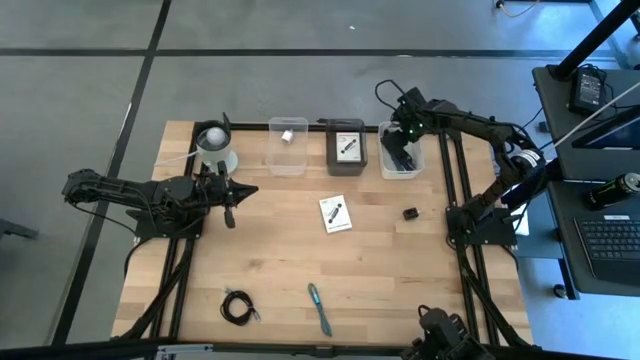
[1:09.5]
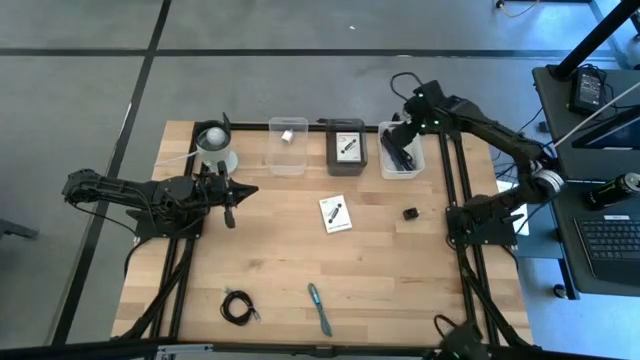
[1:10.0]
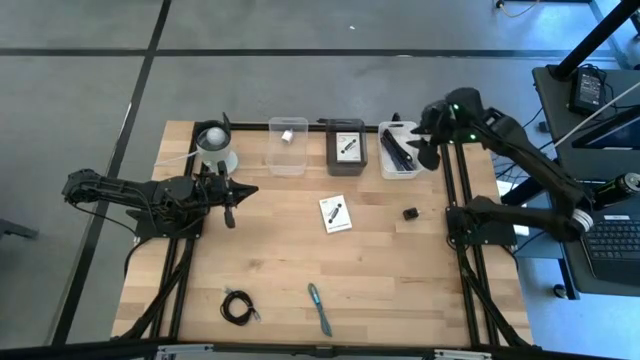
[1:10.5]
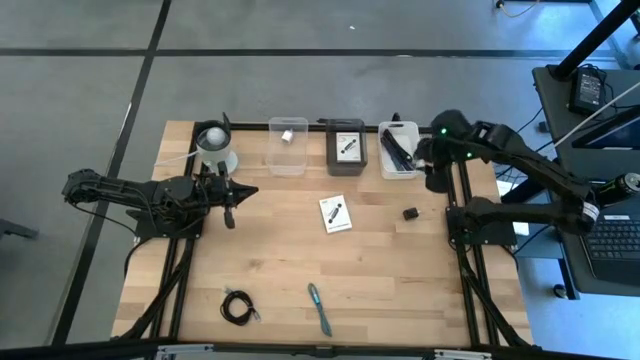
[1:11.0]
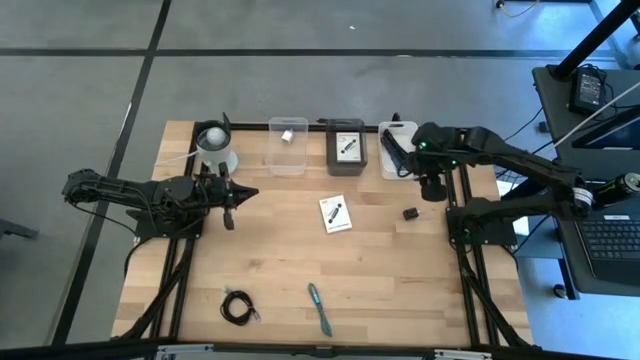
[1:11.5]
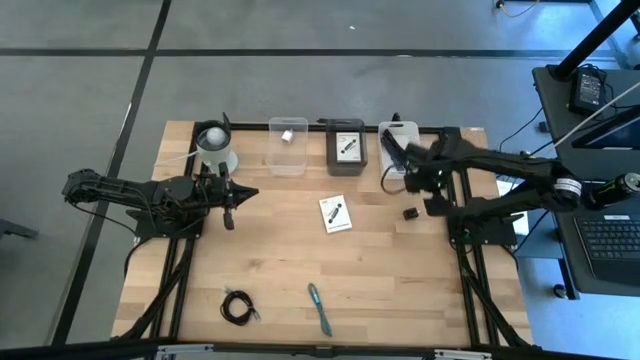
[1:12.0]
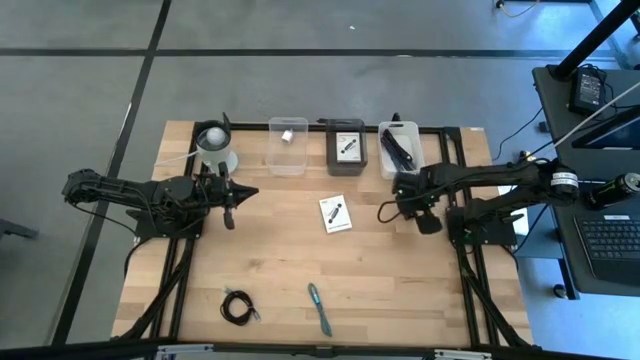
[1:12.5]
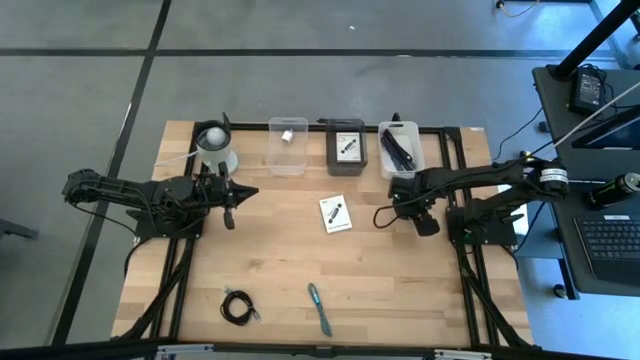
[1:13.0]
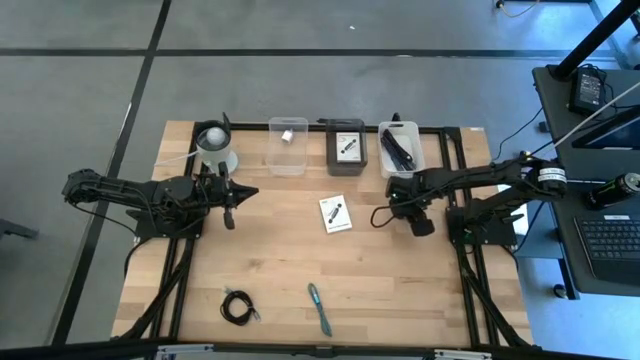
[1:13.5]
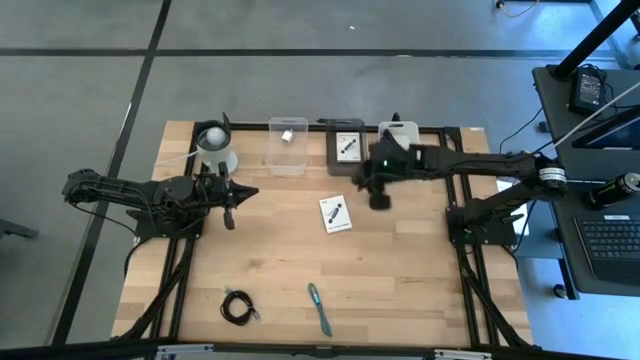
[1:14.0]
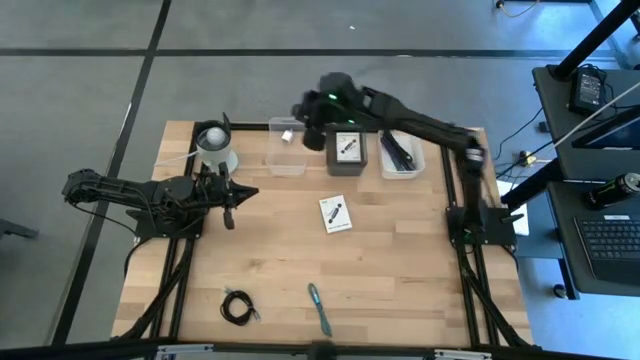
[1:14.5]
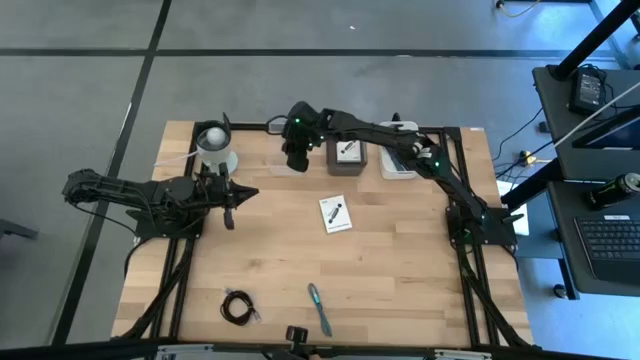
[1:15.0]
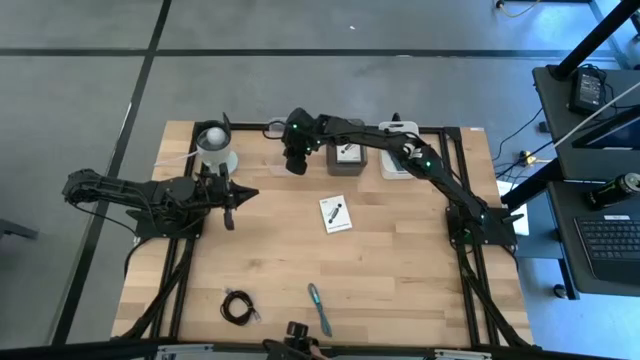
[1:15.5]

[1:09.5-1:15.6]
Task: Pick and place items into bin
Put the black charger adapter into the transparent bin

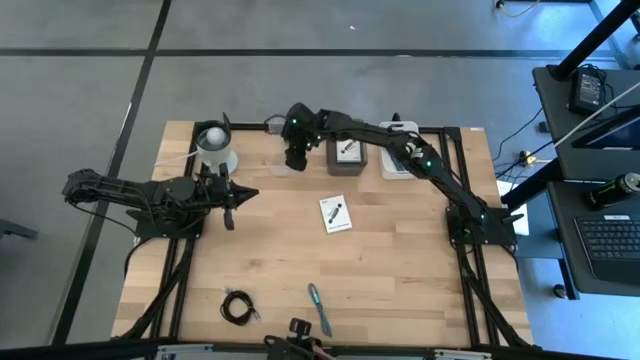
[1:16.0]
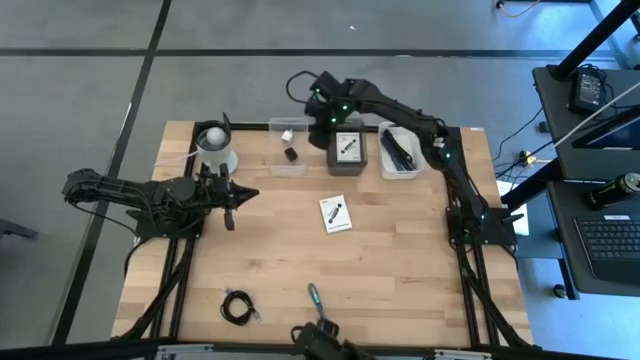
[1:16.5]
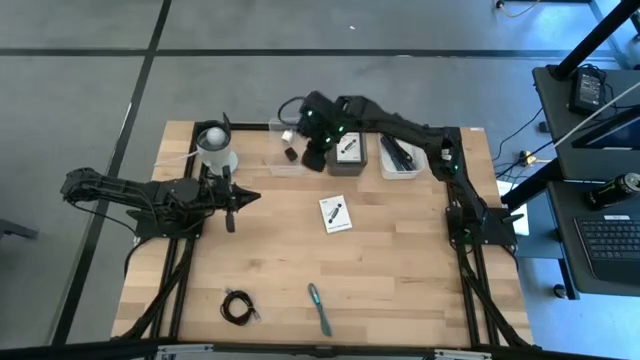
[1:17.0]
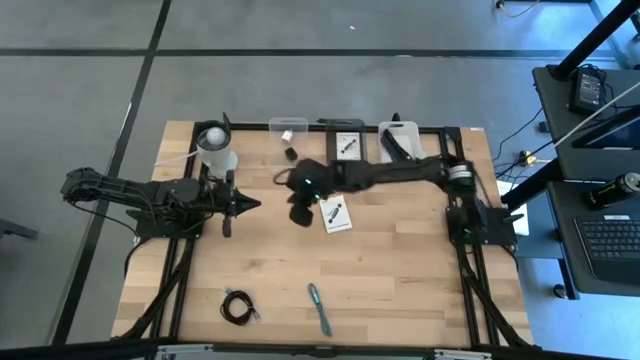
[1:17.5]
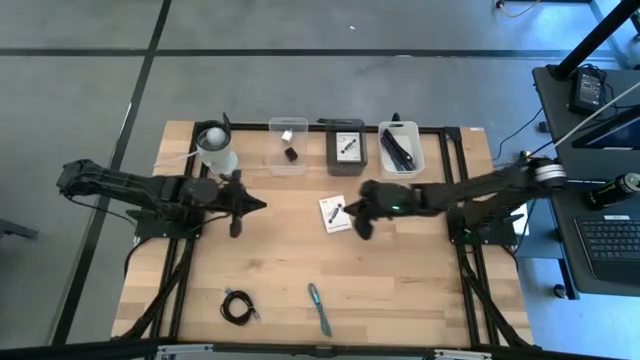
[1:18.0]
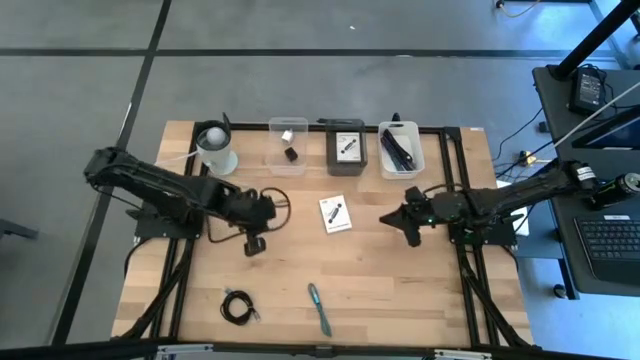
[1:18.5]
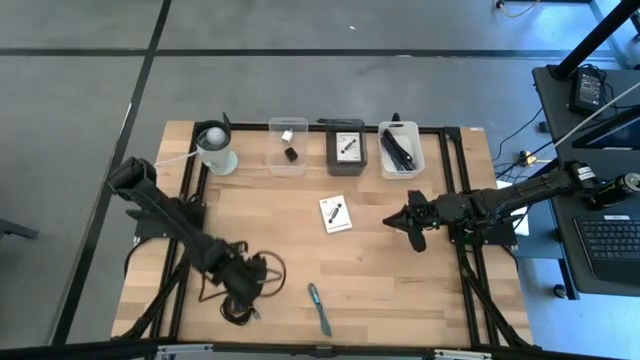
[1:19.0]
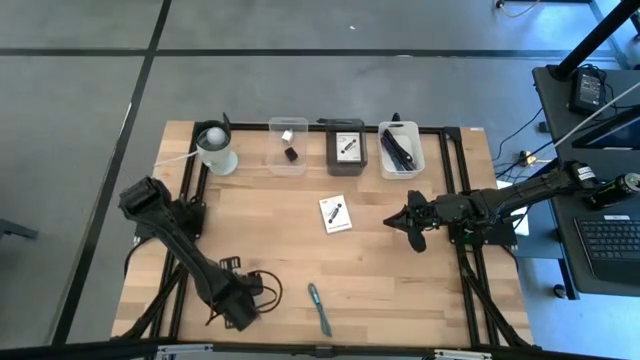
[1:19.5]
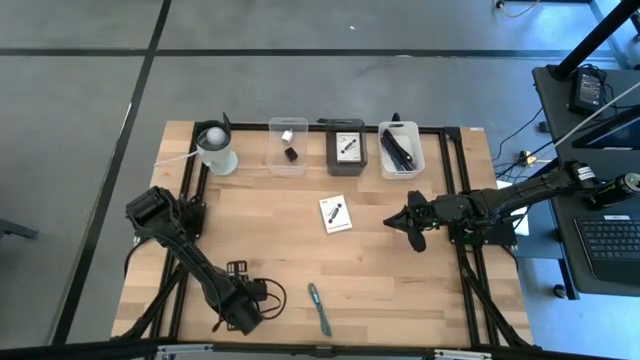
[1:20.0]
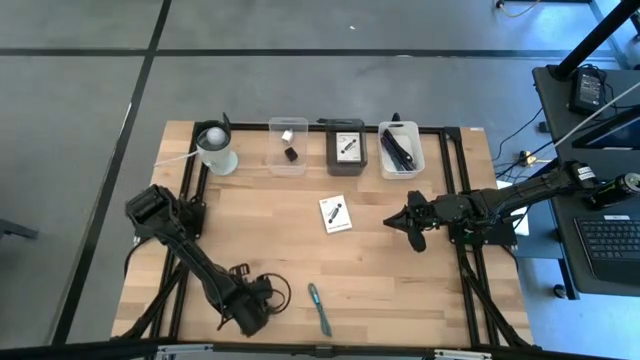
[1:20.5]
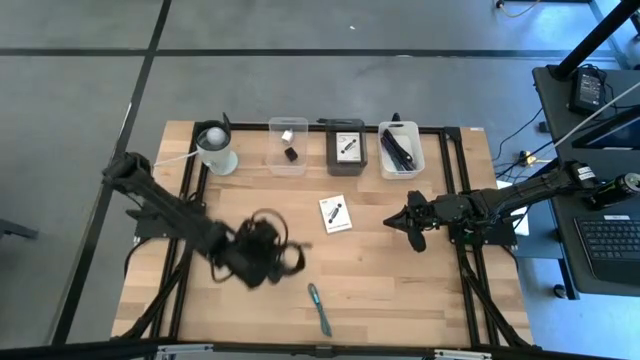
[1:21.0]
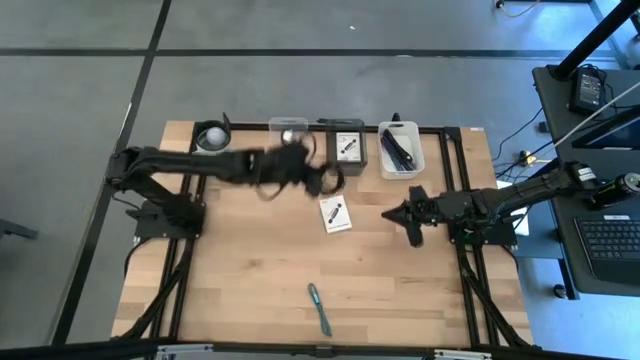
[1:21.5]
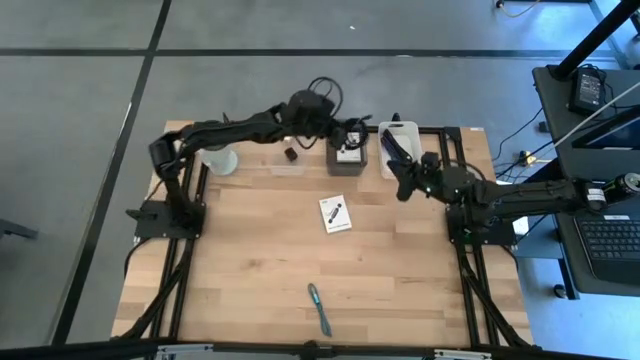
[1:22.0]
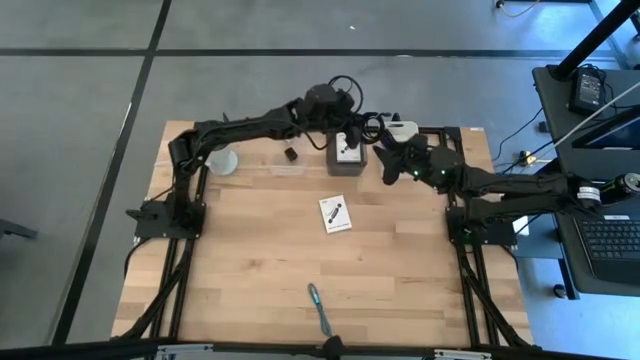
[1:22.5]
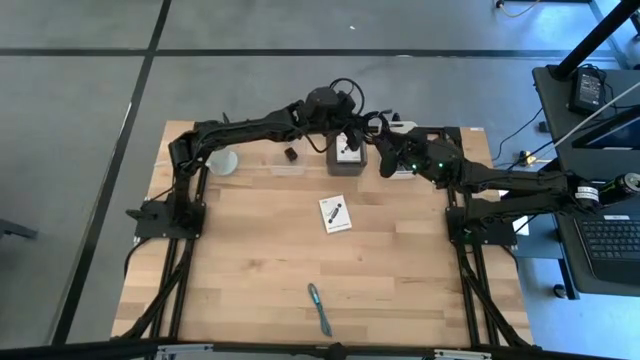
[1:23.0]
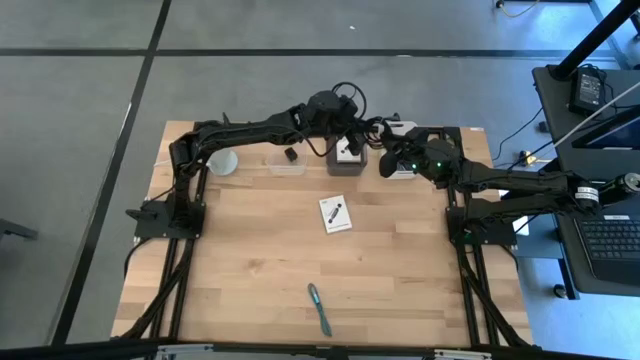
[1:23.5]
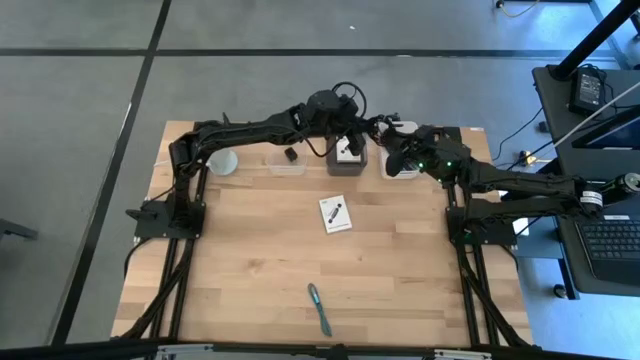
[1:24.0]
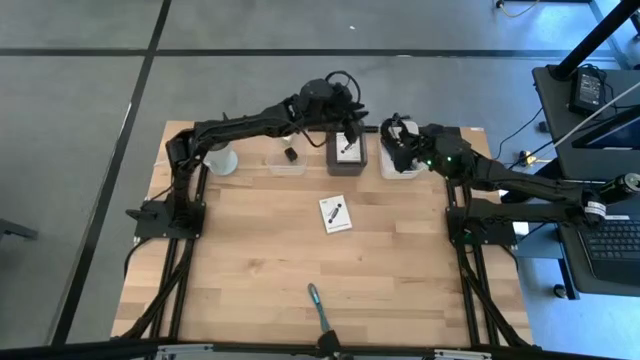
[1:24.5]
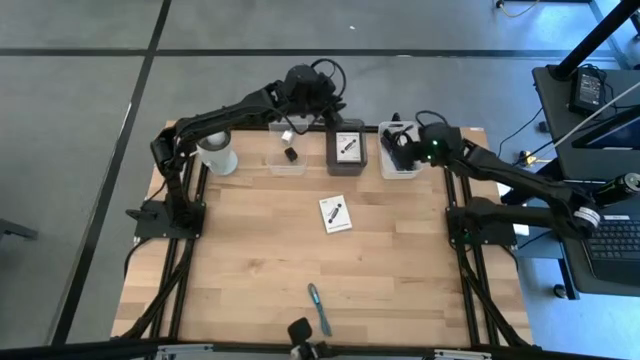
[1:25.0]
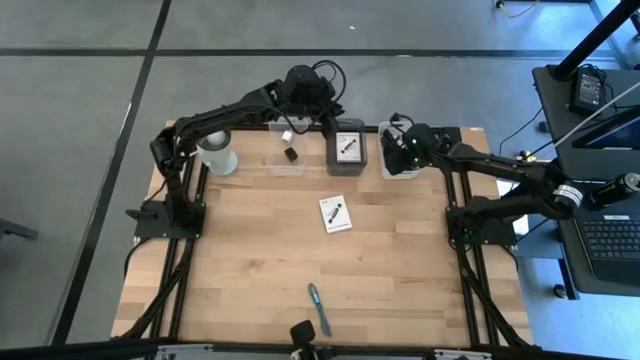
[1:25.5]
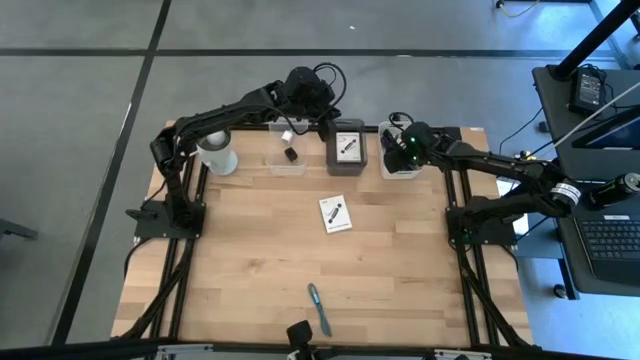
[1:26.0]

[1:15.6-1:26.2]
Put the black charger cable into the white bin

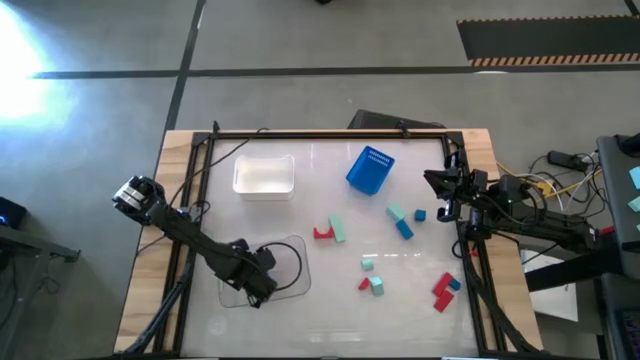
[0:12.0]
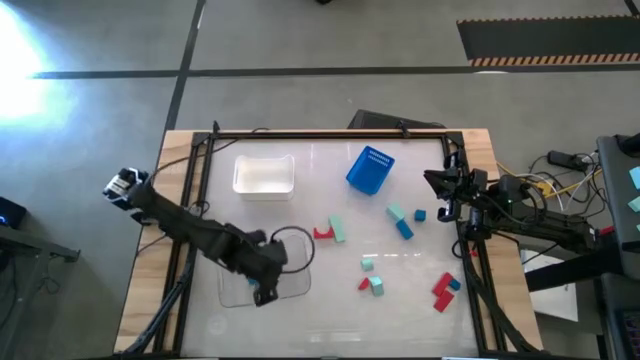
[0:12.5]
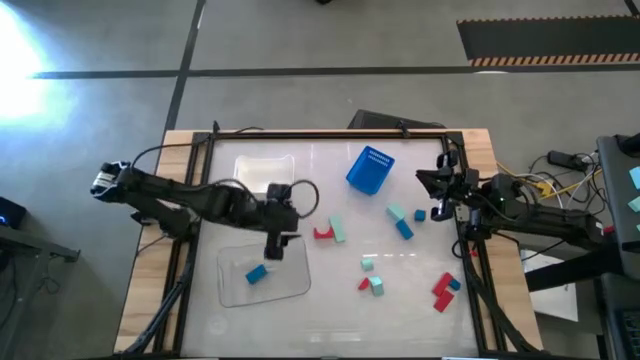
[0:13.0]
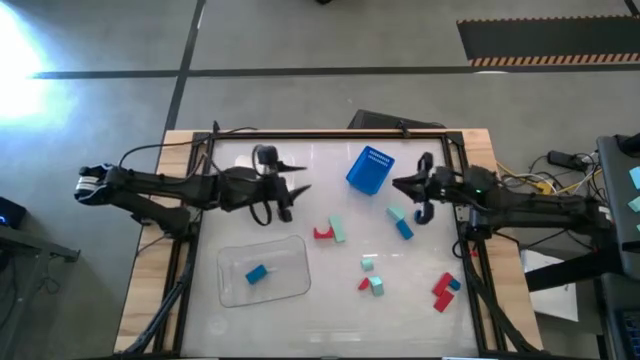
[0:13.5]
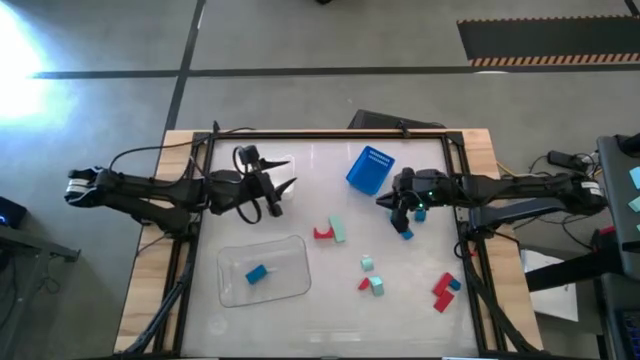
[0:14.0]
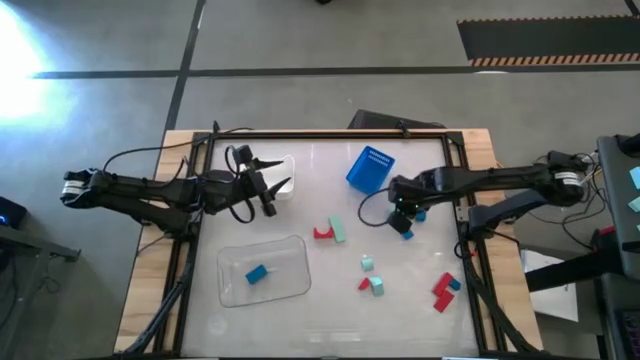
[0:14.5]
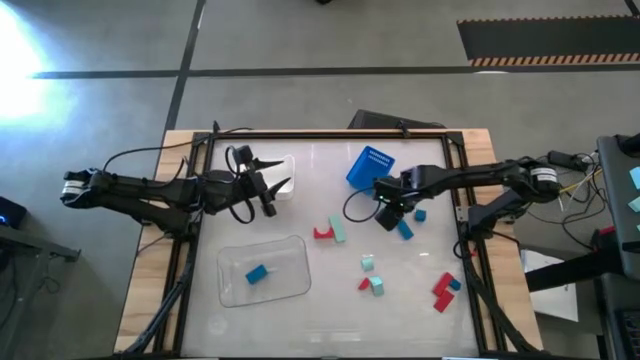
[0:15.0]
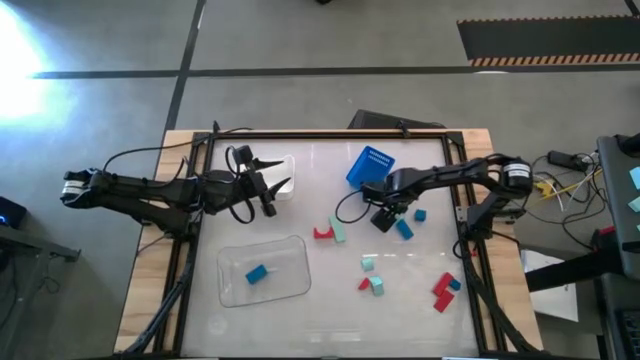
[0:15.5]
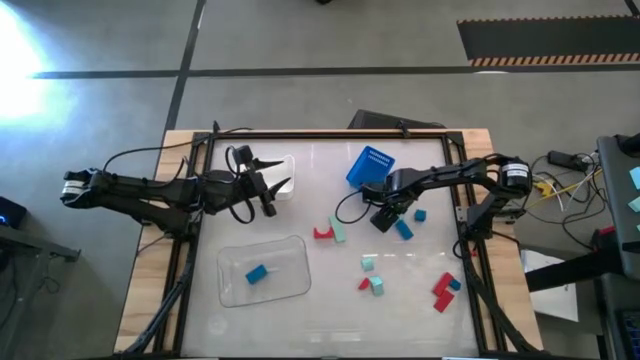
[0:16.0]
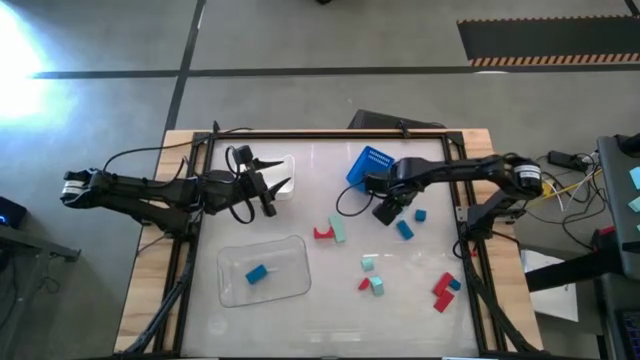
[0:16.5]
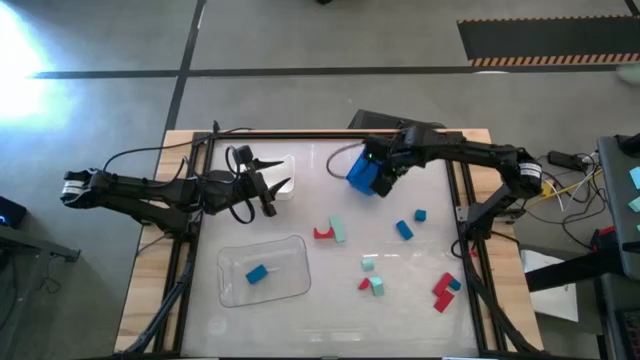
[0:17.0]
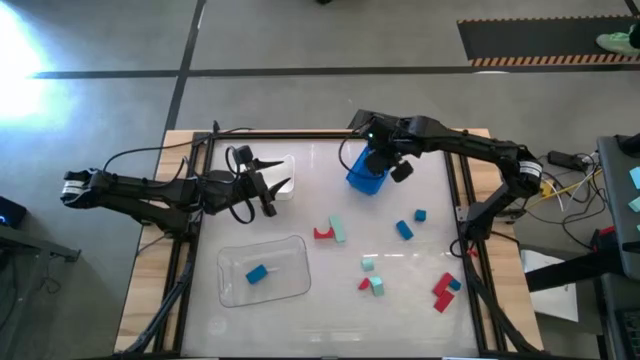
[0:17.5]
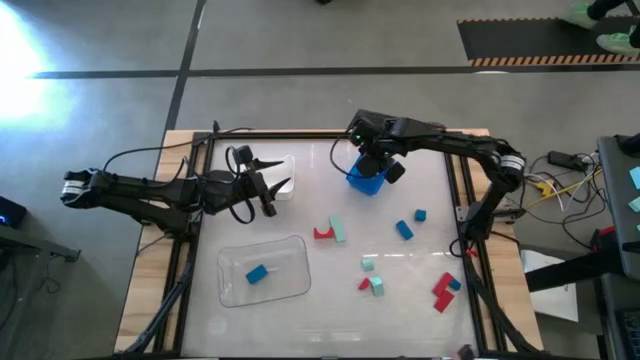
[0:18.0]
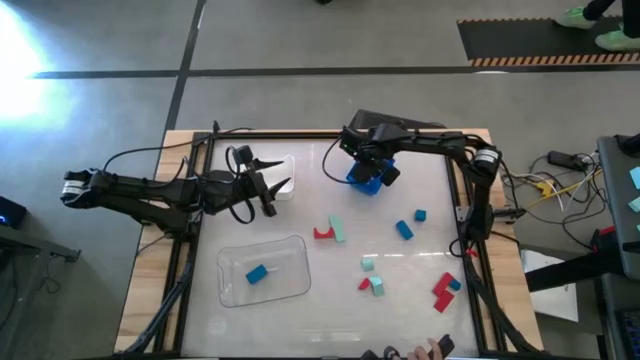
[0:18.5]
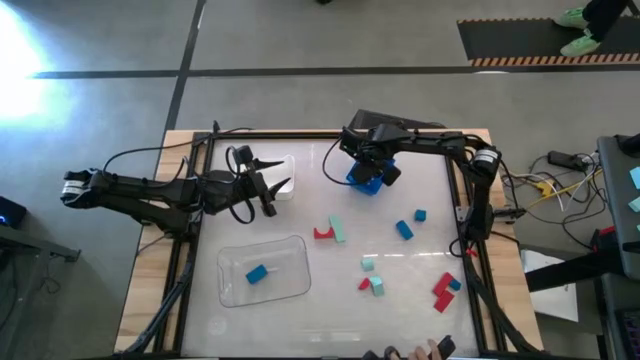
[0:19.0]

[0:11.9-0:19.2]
Task: Sort & place blocks by color
Put the light blue block into the blue bin
